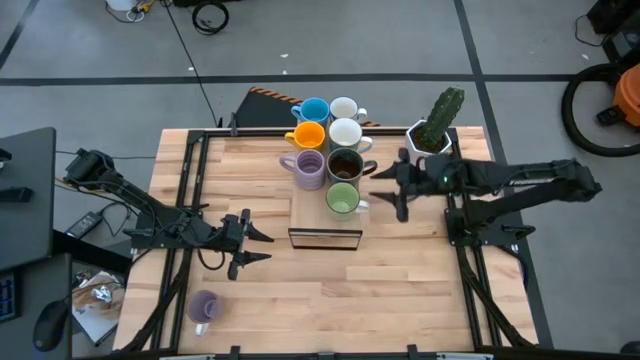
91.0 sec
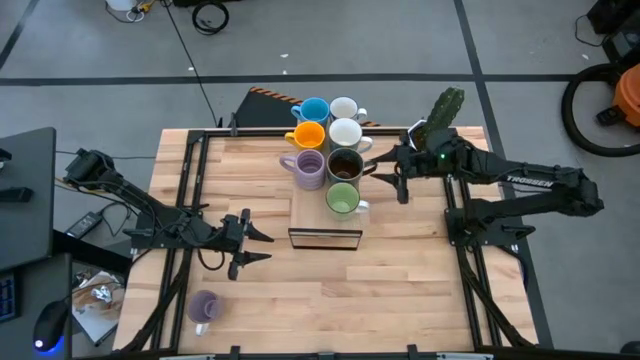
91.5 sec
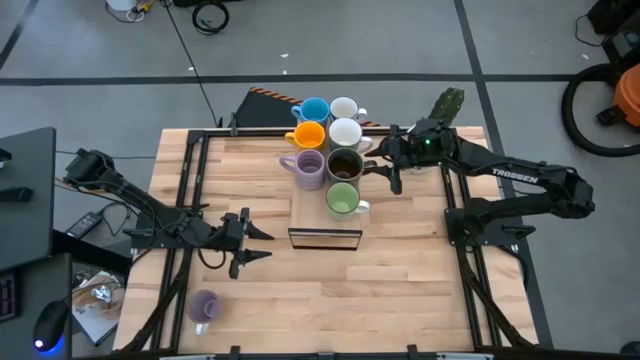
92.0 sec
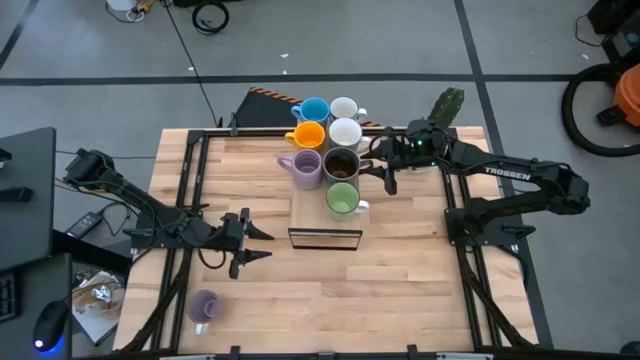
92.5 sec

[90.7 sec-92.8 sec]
Task: Place coffee mugs
Adjust the blue brown mug on the shelf

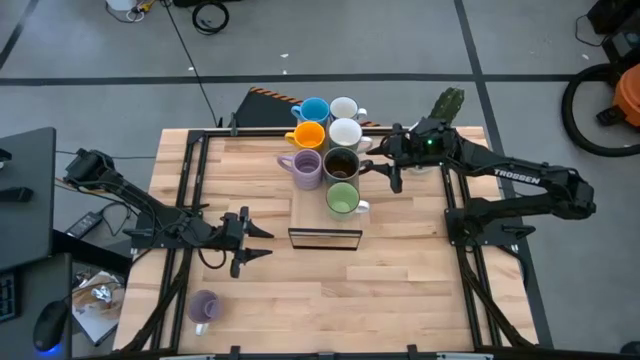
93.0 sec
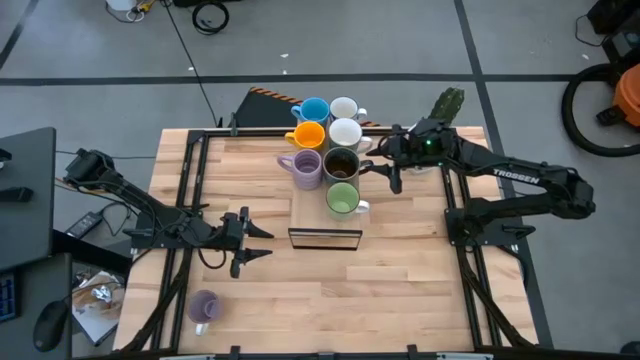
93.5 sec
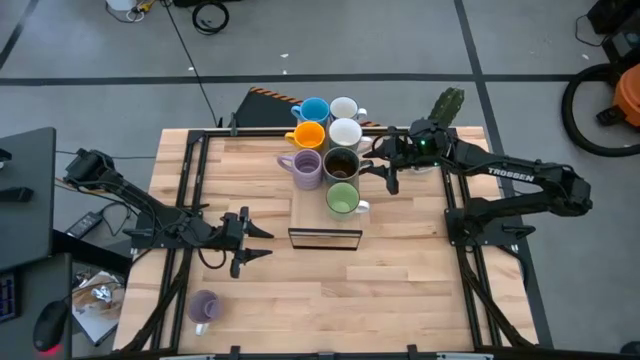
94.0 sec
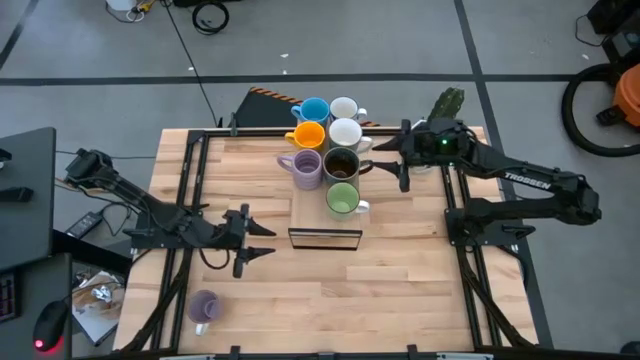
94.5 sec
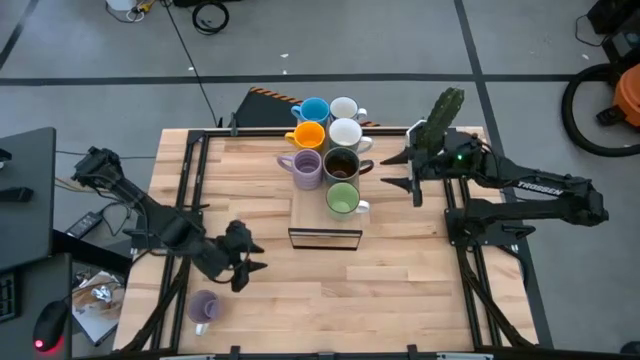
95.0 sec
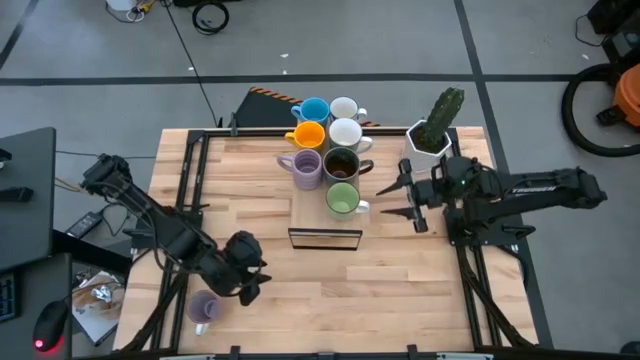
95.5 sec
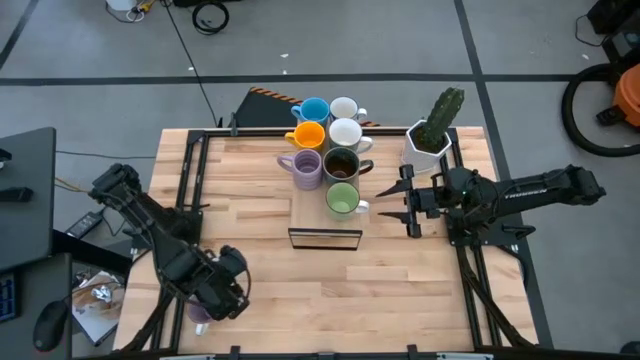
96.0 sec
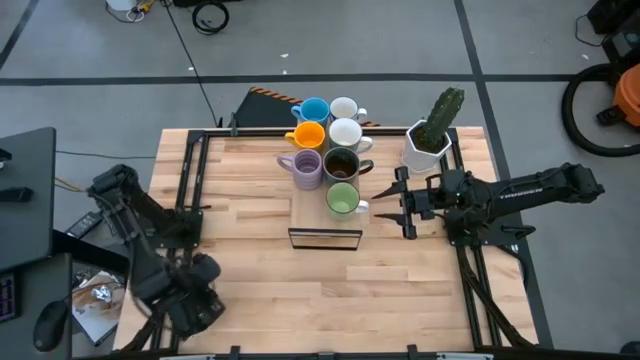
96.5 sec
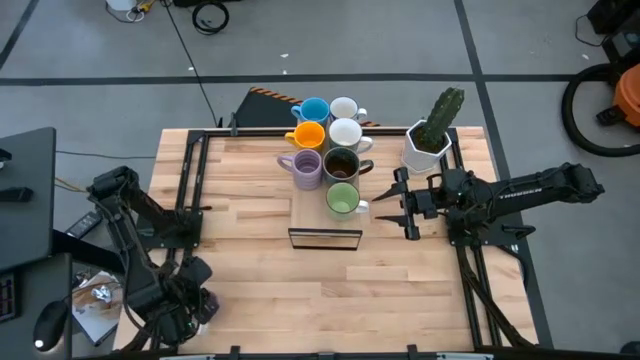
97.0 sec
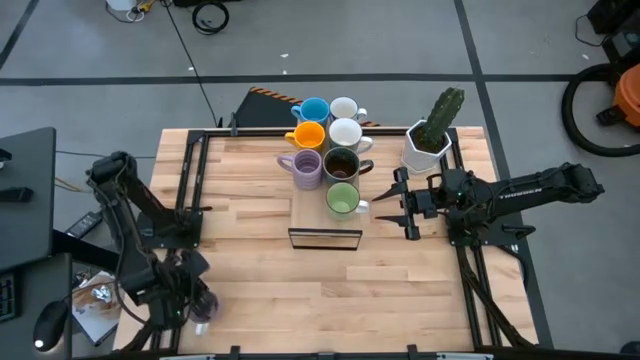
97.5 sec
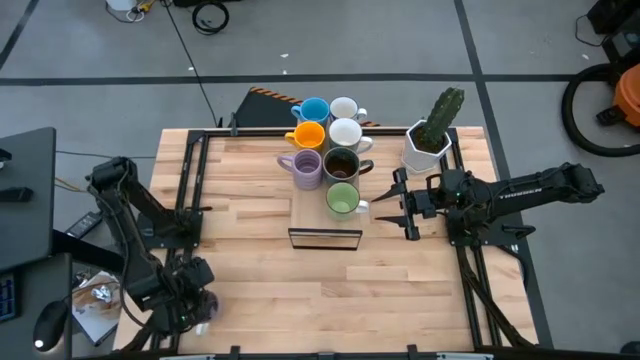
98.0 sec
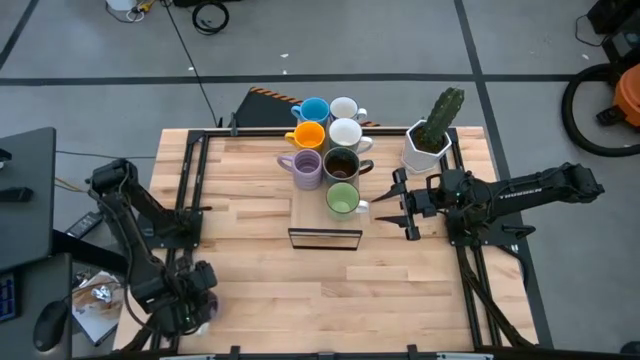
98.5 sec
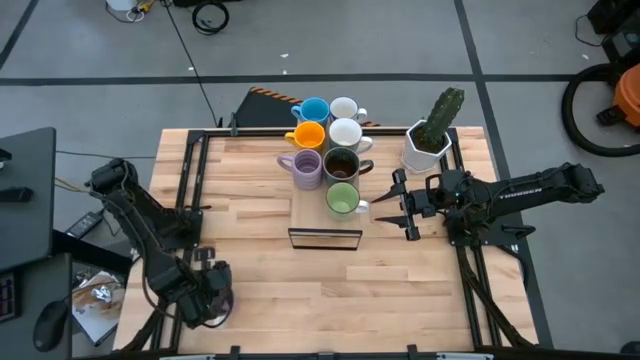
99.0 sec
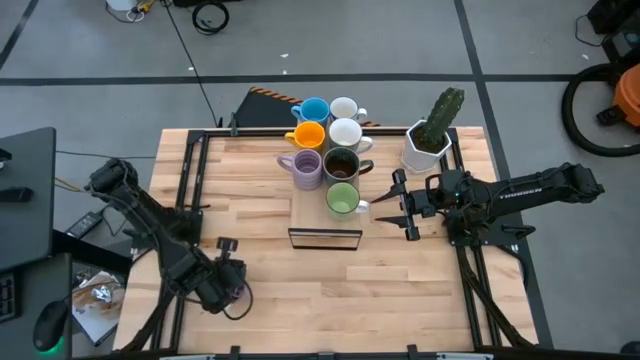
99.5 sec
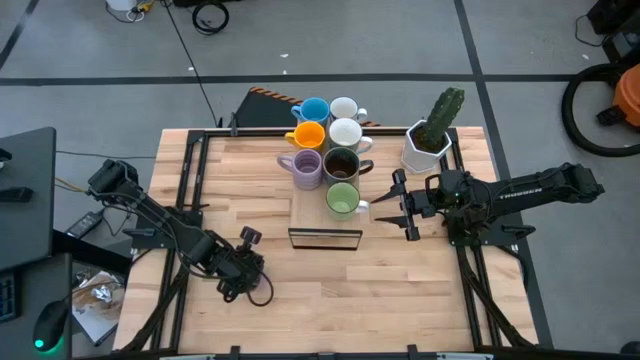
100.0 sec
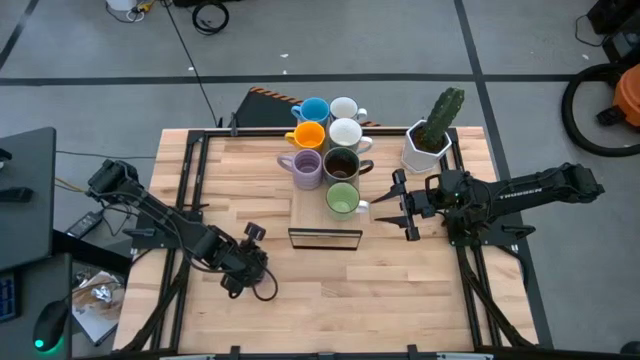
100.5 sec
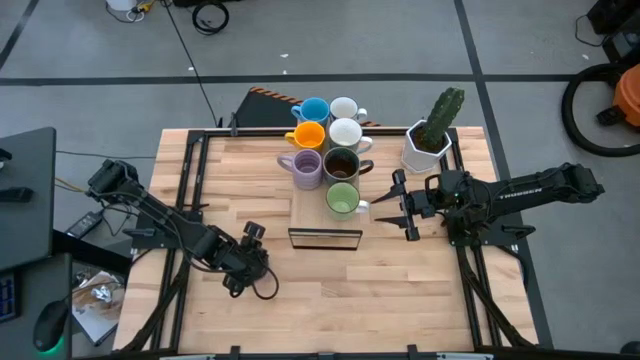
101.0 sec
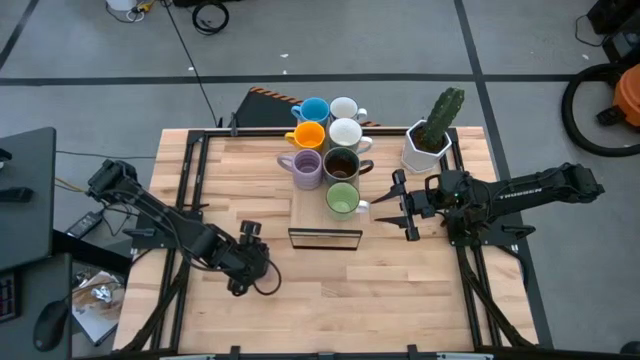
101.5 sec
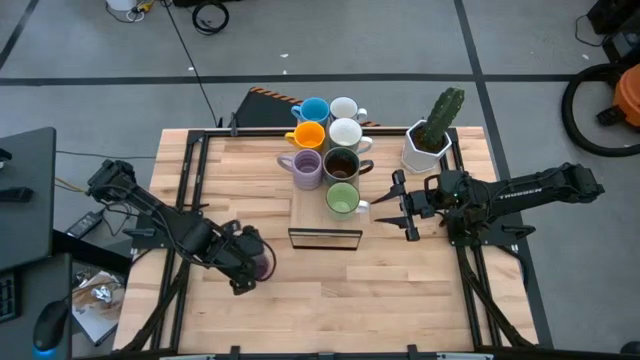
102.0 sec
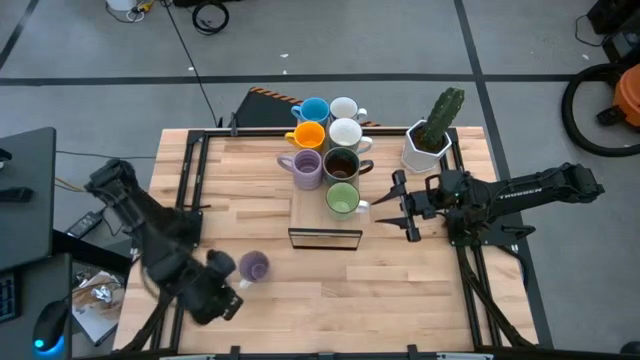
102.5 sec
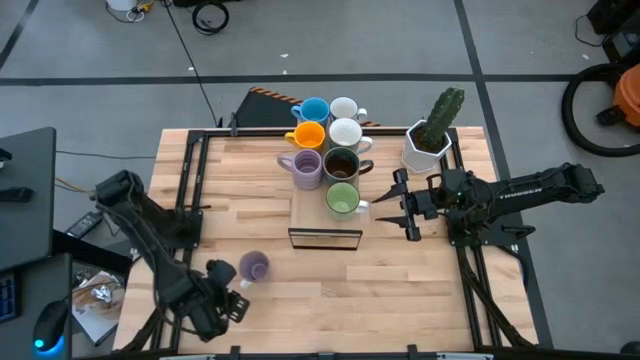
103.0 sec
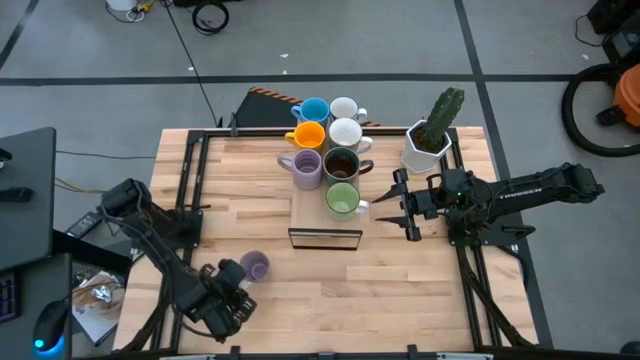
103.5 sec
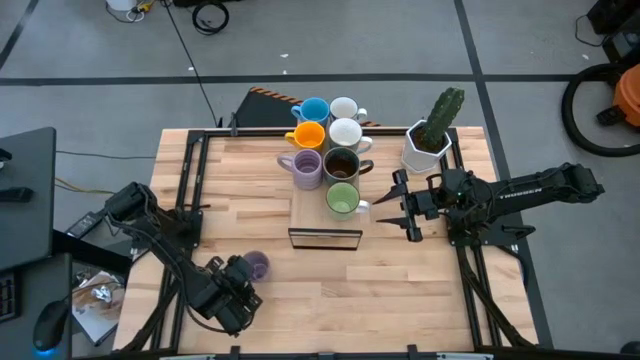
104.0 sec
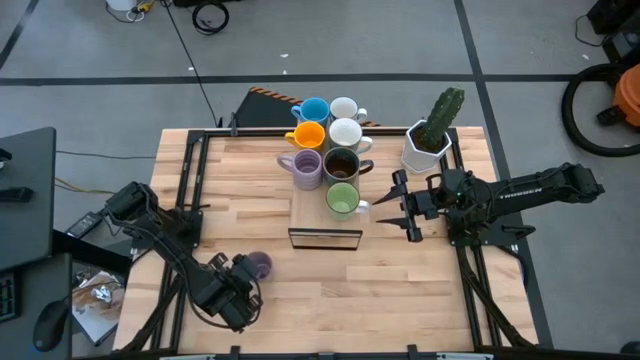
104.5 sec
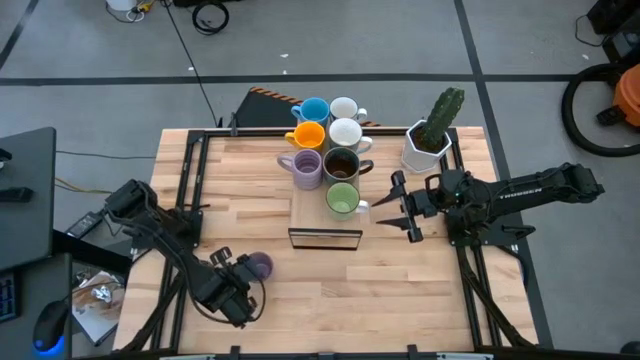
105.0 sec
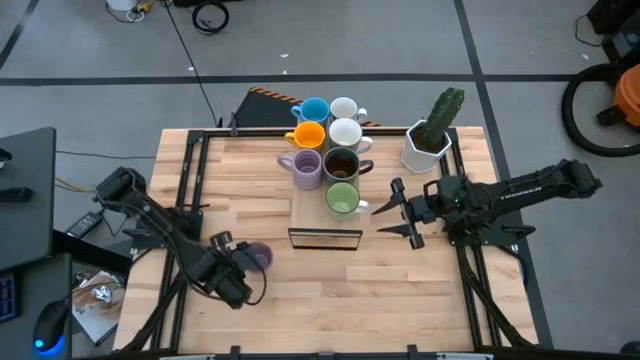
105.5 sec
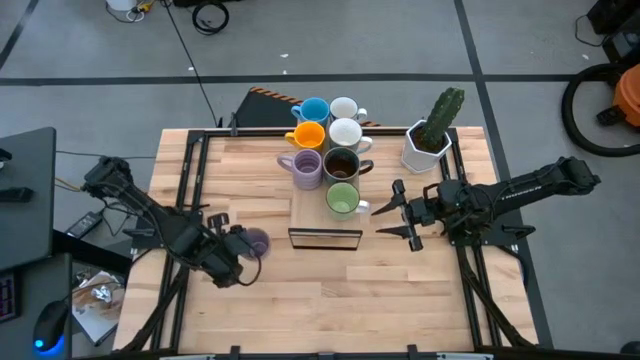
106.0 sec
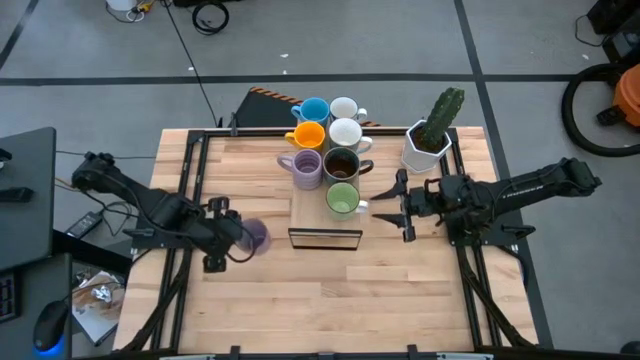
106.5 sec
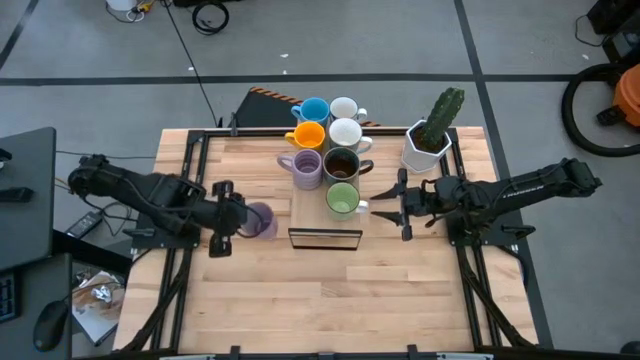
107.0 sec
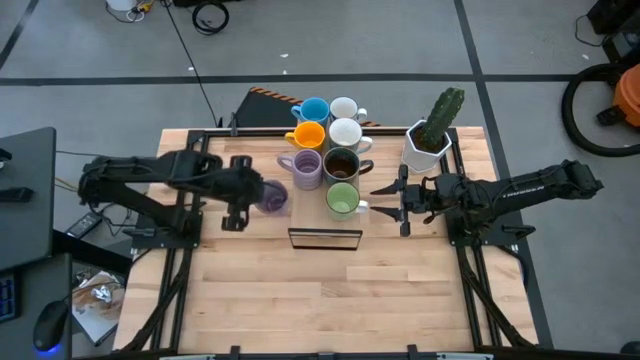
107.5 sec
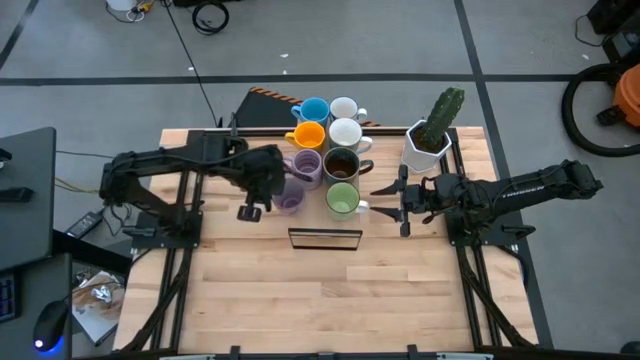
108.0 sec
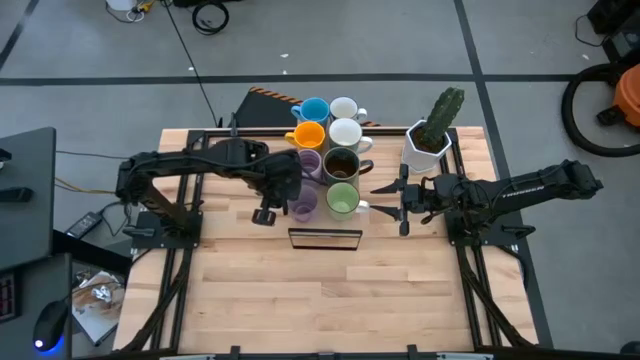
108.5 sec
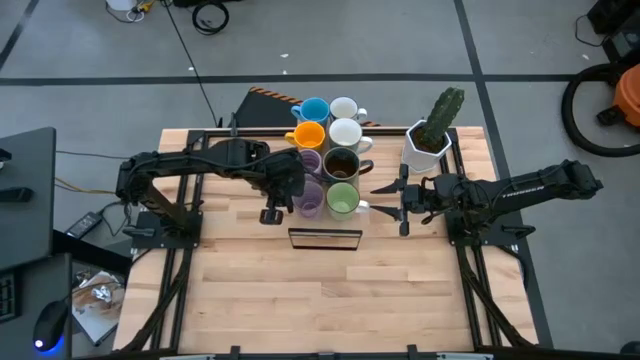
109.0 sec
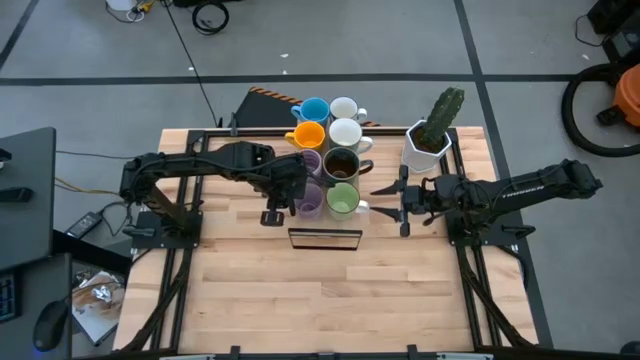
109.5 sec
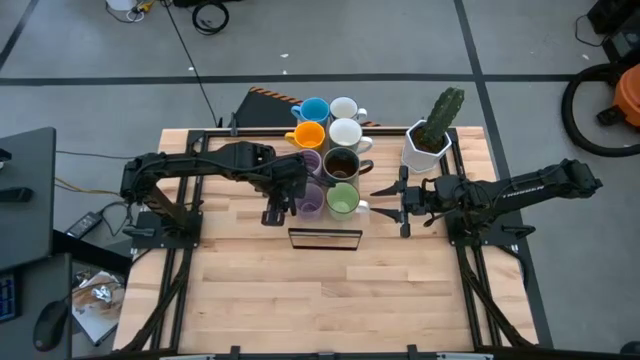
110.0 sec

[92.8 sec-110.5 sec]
Put the purple mug on the shelf
